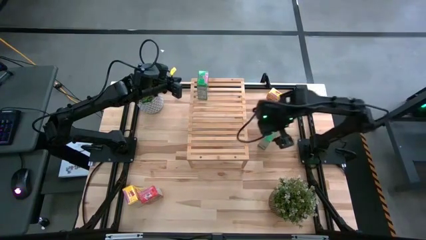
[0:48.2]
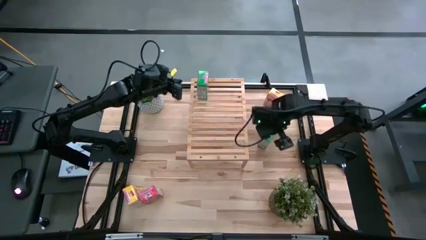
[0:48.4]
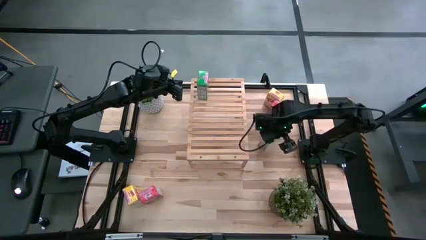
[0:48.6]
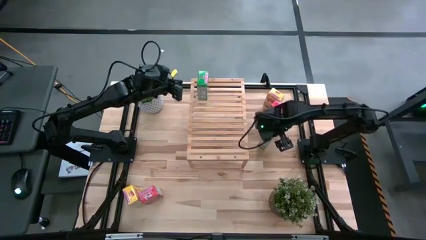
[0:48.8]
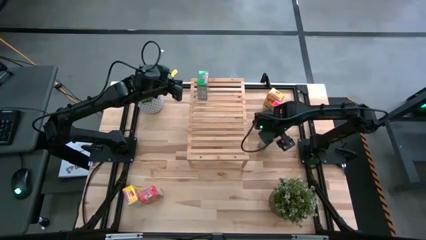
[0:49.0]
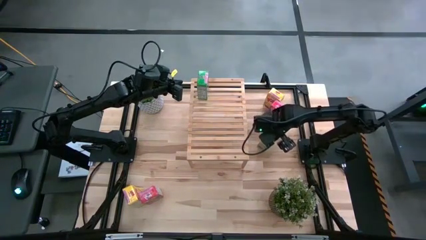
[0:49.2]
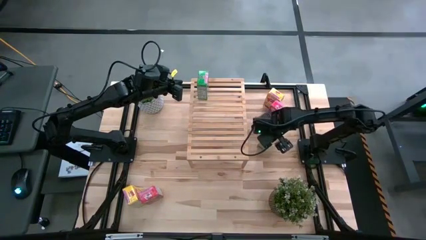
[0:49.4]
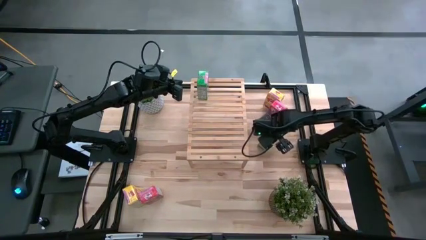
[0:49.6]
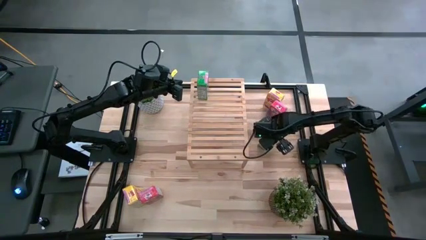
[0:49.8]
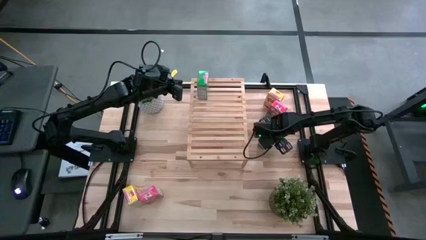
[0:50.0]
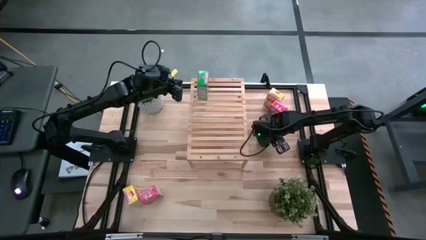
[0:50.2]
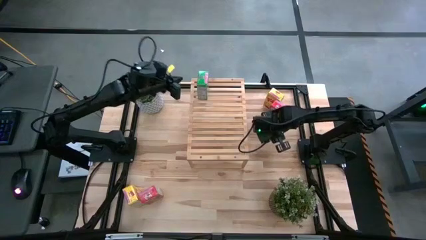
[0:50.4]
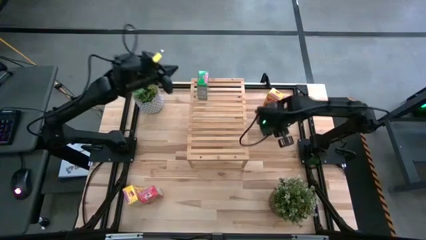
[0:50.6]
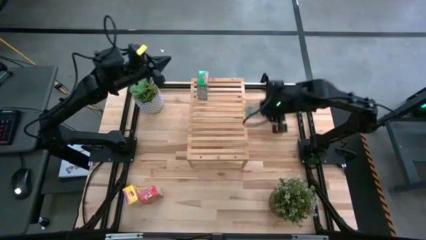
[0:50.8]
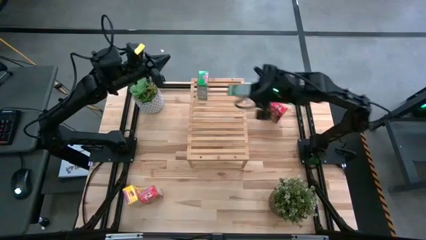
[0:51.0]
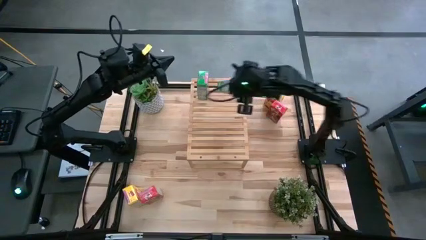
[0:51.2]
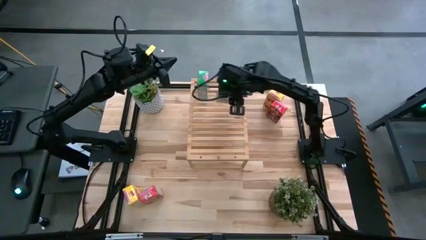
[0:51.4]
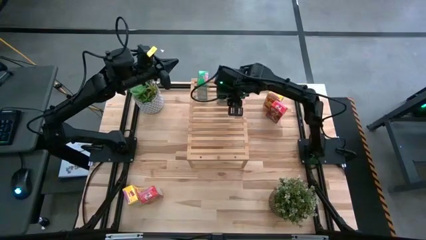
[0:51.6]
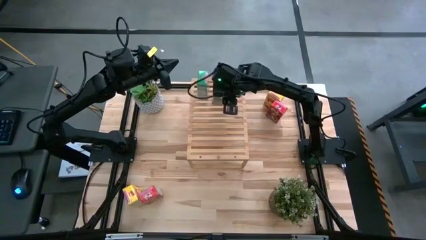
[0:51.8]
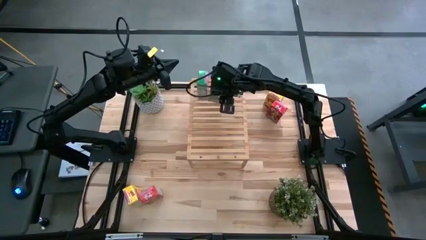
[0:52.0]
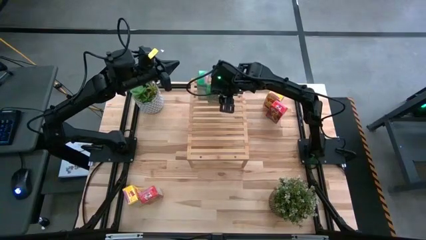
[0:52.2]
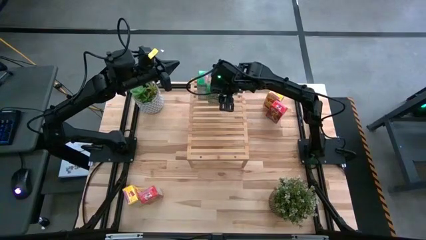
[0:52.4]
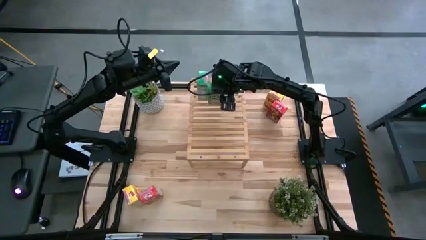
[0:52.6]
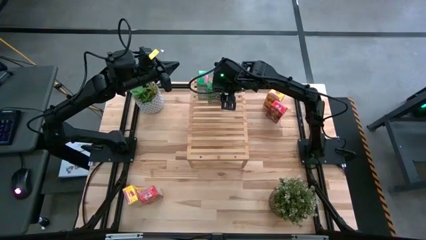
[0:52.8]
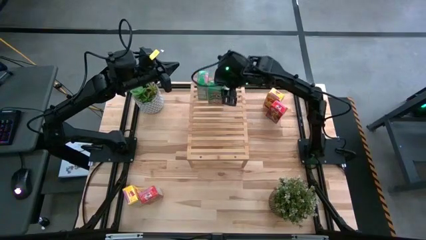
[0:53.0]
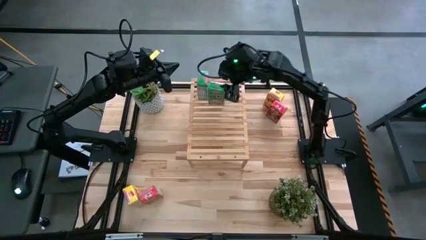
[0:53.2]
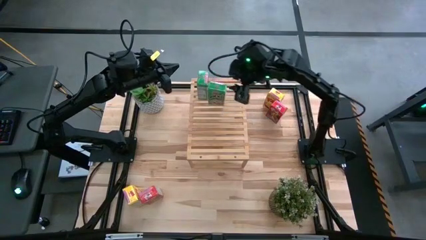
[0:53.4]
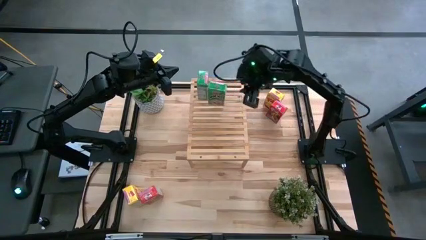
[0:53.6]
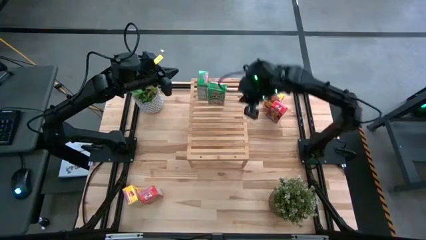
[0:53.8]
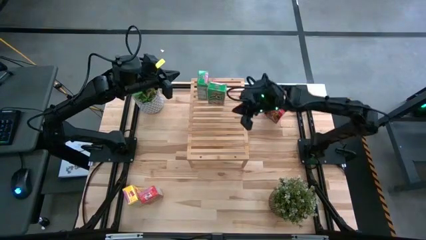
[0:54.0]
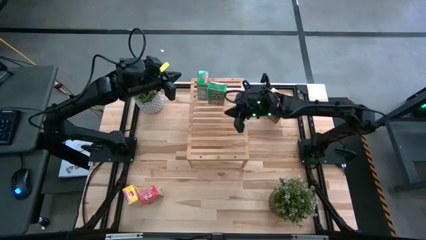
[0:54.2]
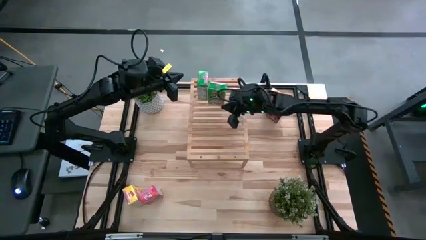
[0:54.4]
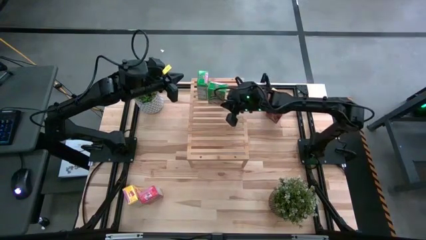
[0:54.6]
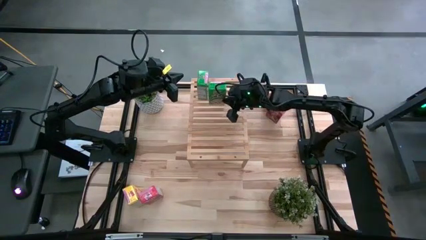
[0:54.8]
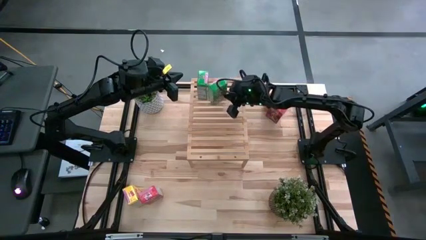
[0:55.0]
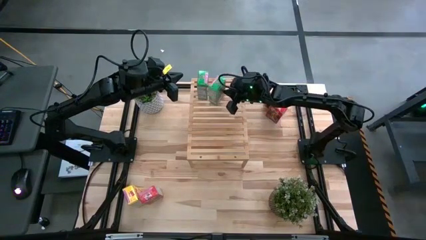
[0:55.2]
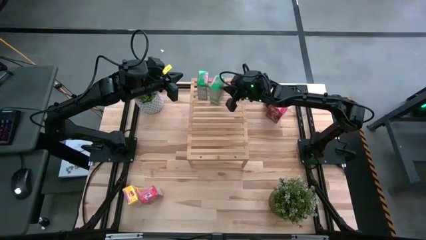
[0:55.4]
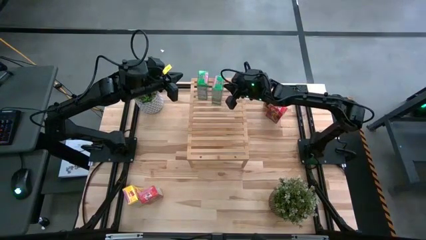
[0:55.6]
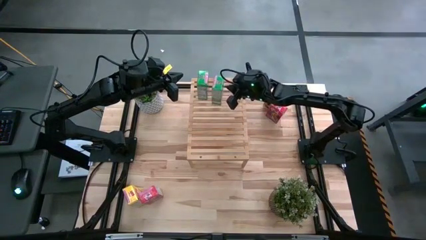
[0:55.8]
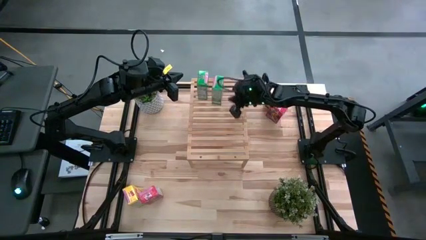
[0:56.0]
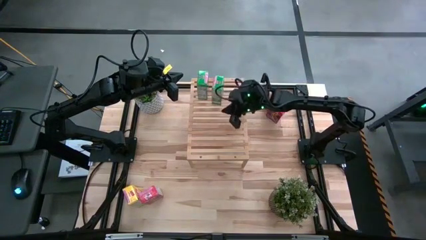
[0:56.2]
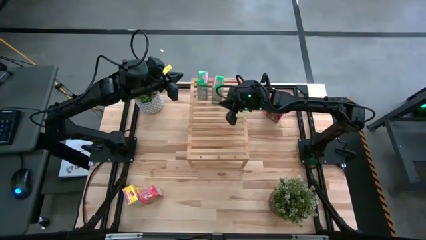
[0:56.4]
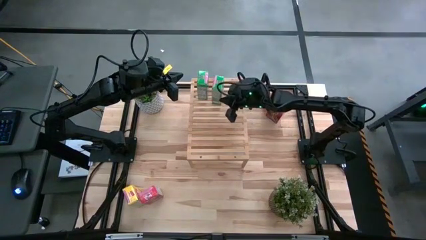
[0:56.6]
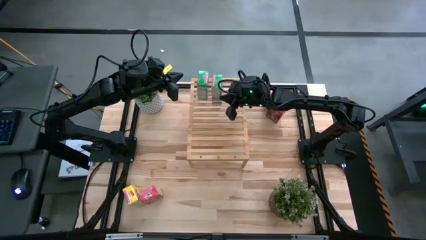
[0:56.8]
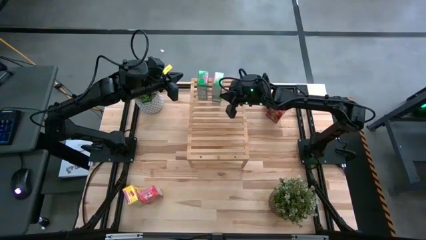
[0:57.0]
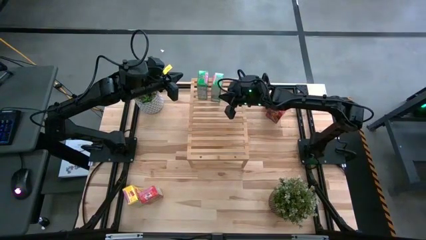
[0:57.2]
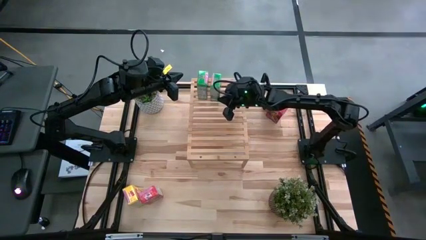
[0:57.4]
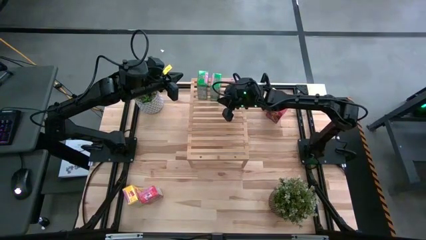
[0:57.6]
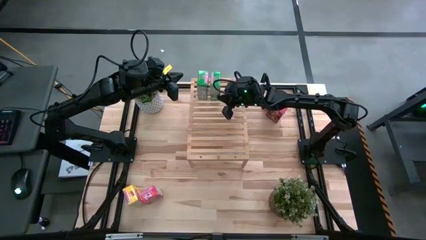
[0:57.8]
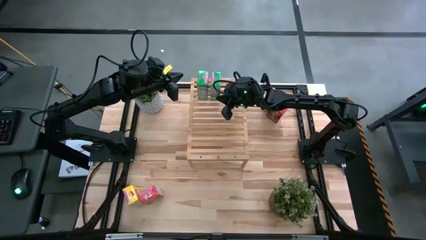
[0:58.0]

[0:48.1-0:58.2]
Task: Stack cereal on shelf
Put the right green cereal box on the shelf and align with the other green cereal box

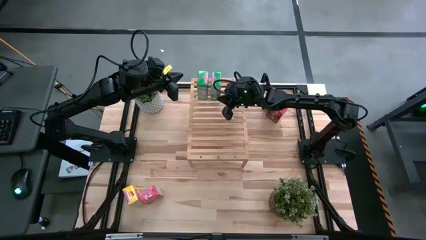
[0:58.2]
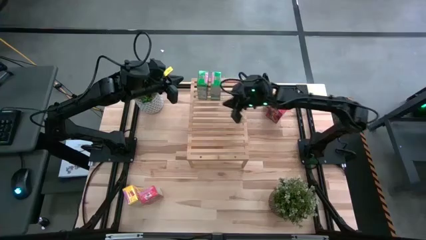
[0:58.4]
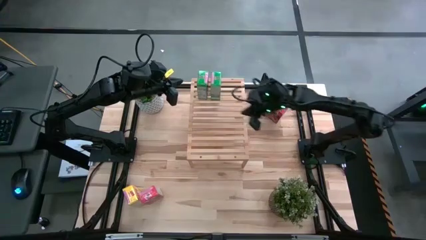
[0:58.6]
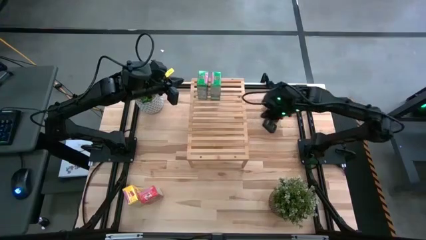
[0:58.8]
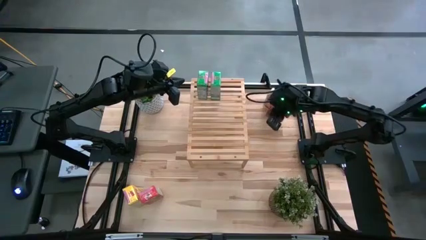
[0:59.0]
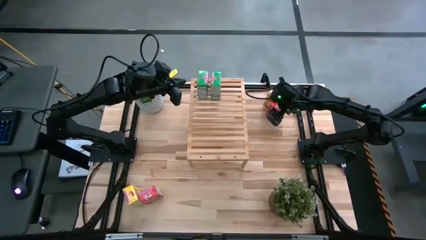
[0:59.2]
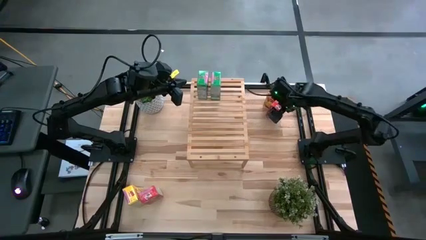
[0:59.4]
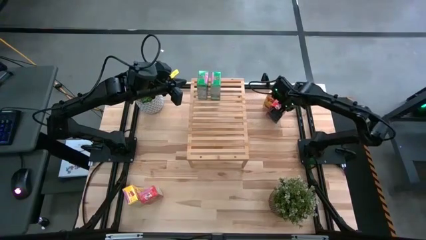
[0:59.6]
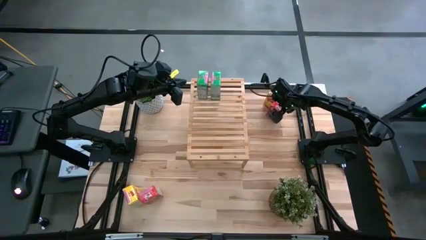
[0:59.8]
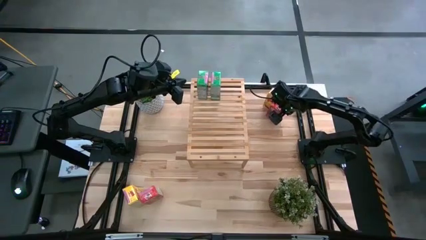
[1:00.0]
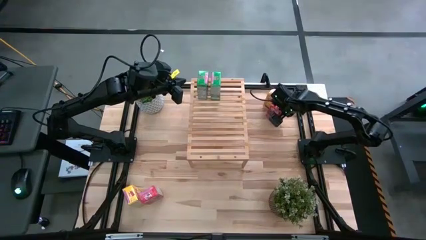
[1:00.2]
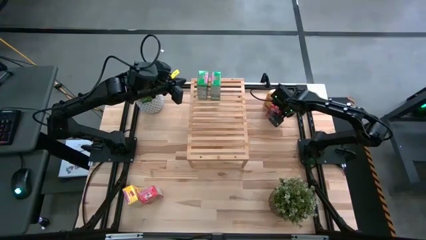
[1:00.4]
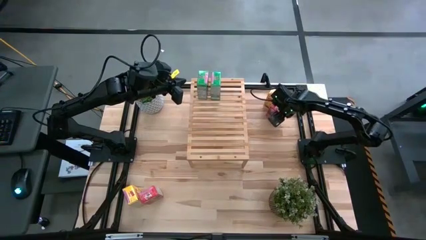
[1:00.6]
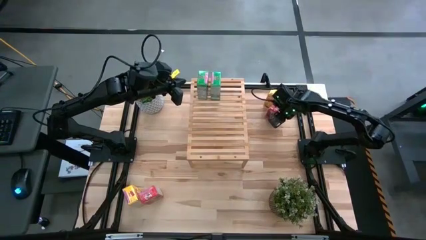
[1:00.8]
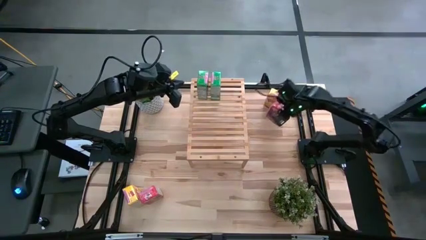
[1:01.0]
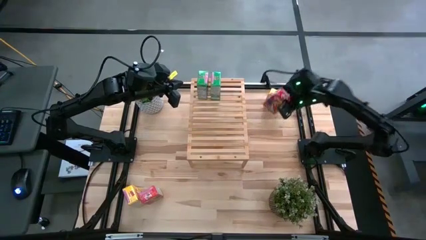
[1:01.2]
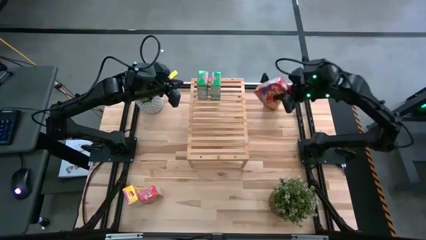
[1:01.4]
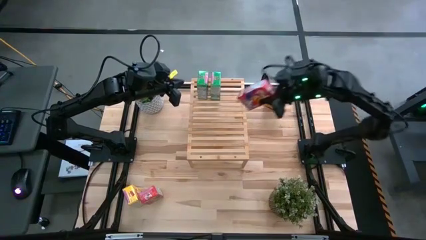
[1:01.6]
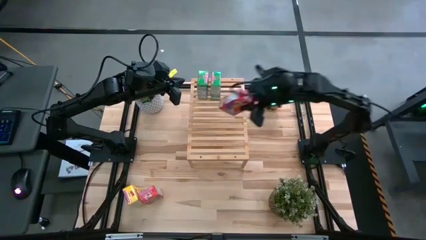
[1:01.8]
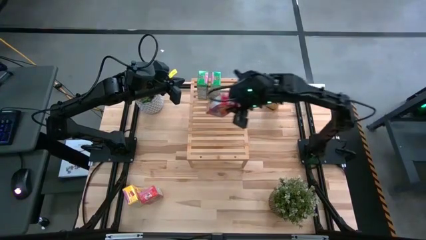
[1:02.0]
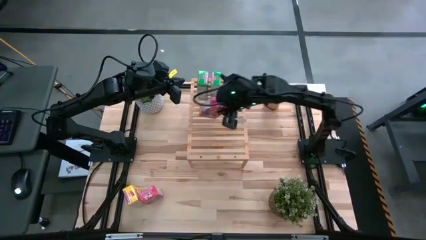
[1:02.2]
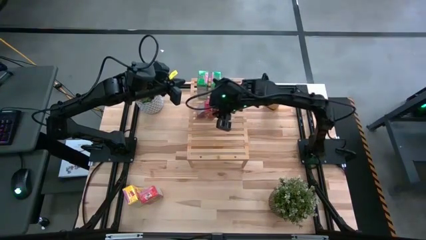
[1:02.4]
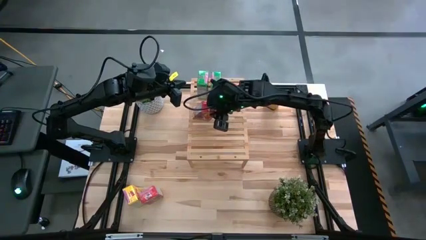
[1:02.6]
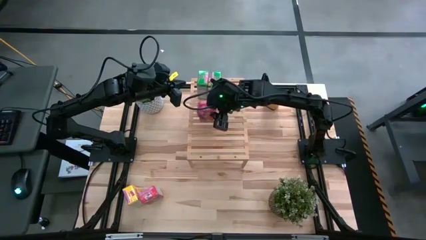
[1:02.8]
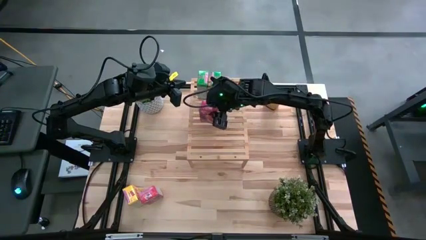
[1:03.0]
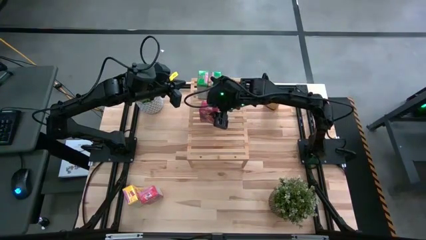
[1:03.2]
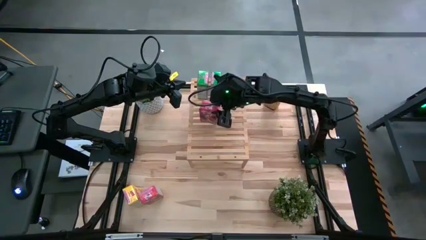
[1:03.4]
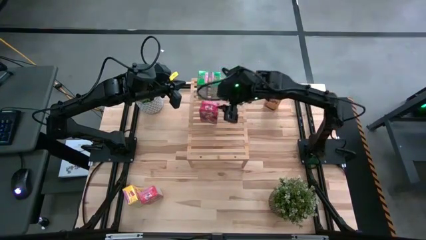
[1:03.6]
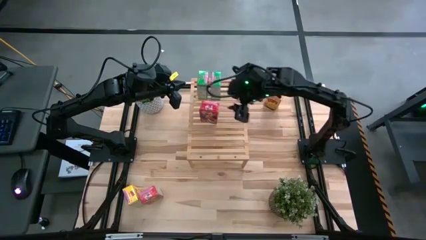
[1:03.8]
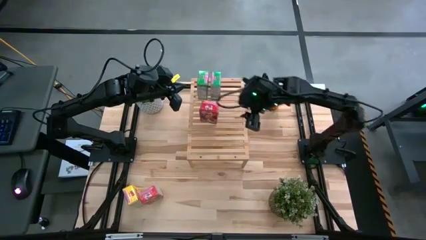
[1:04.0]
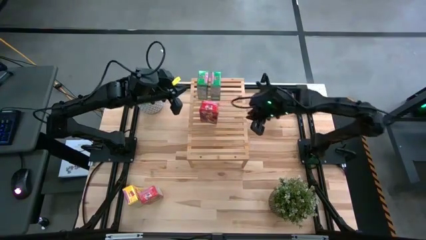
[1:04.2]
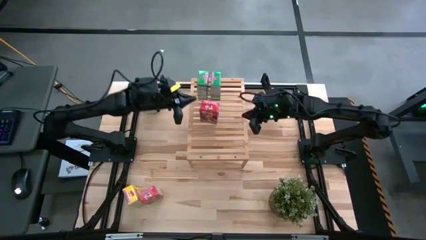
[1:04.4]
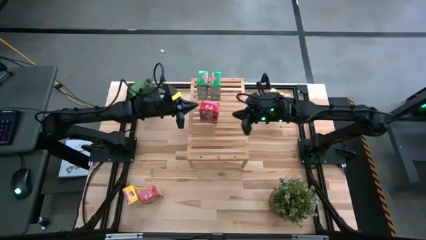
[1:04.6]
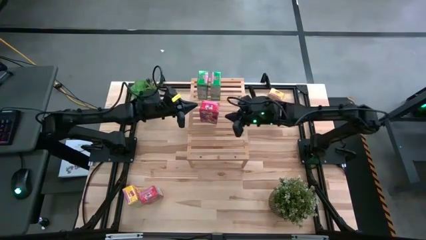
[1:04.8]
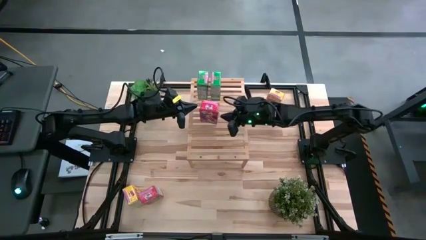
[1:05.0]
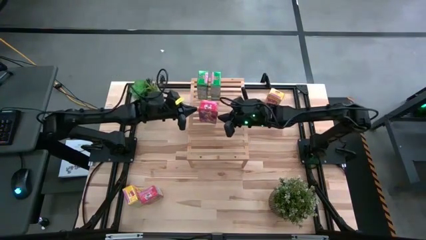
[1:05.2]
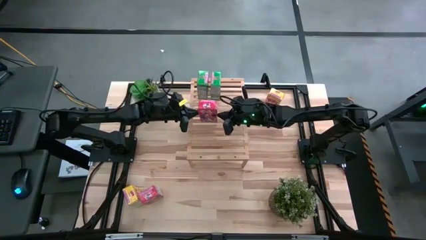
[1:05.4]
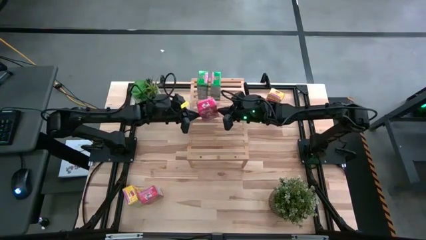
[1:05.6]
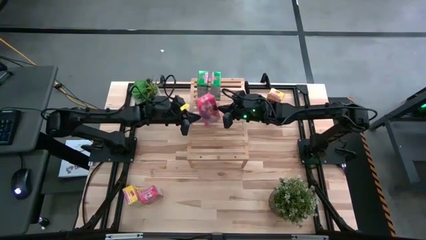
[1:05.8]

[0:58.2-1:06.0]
Put the top red right cereal box on the shelf
